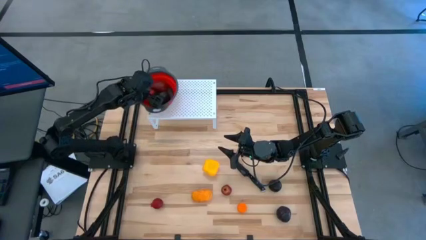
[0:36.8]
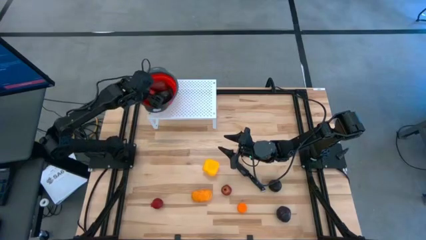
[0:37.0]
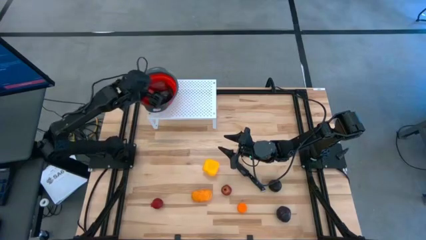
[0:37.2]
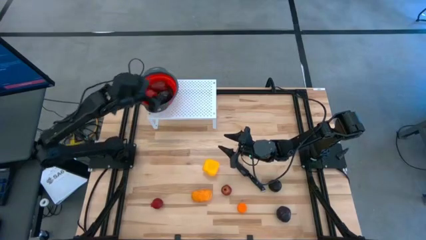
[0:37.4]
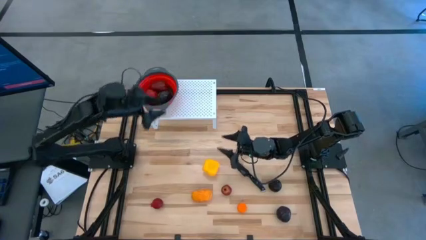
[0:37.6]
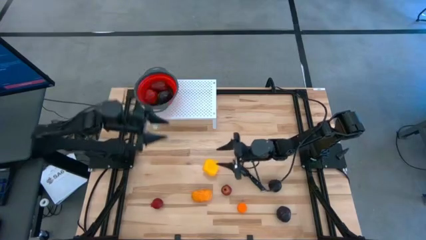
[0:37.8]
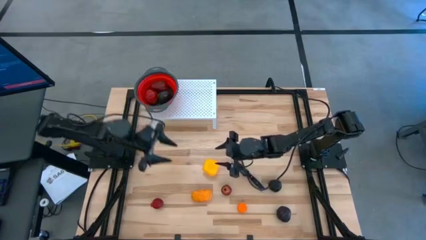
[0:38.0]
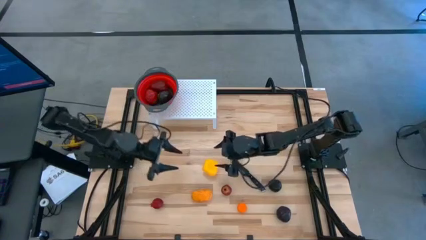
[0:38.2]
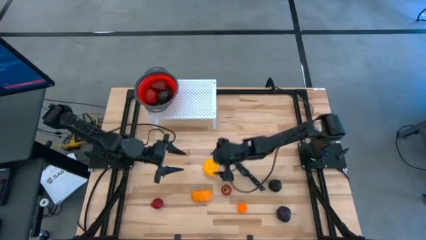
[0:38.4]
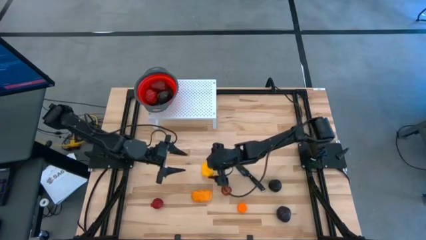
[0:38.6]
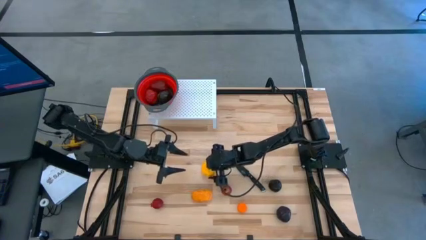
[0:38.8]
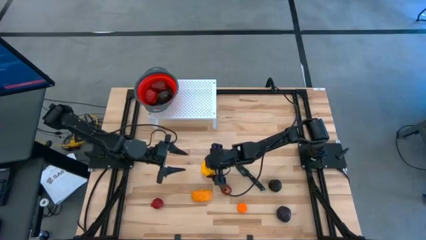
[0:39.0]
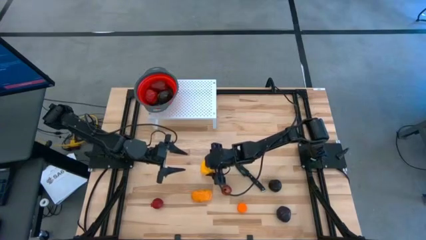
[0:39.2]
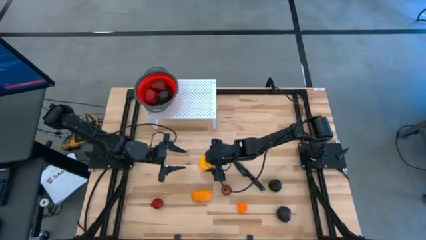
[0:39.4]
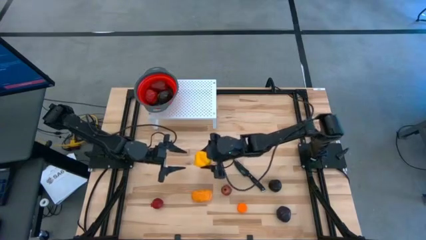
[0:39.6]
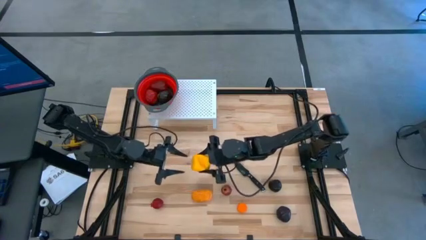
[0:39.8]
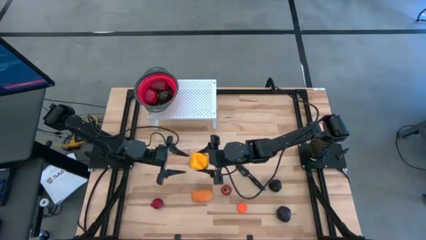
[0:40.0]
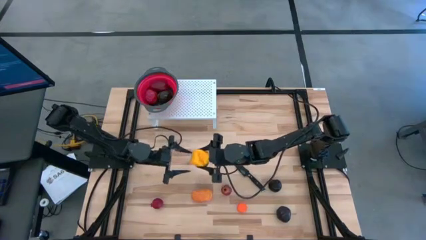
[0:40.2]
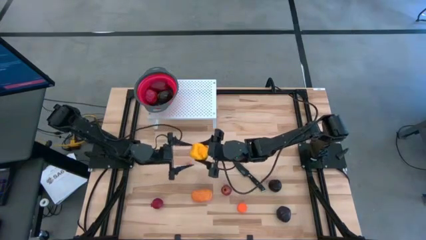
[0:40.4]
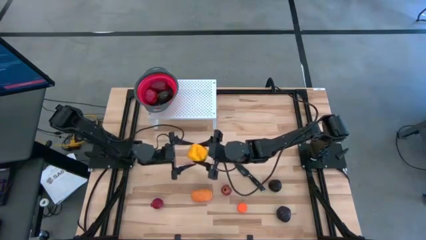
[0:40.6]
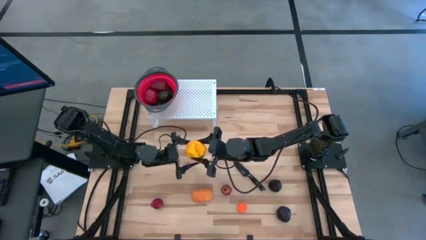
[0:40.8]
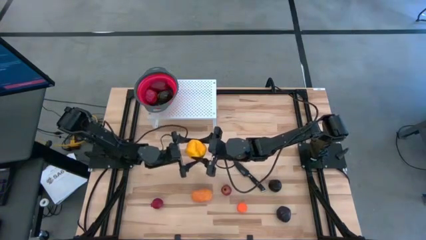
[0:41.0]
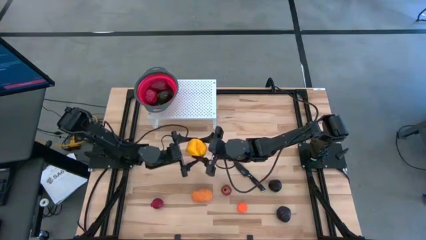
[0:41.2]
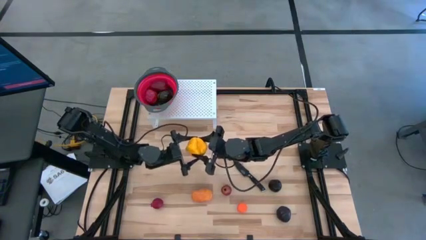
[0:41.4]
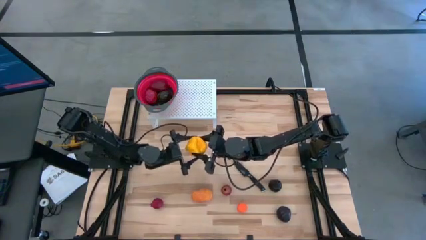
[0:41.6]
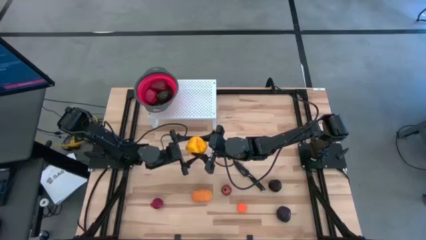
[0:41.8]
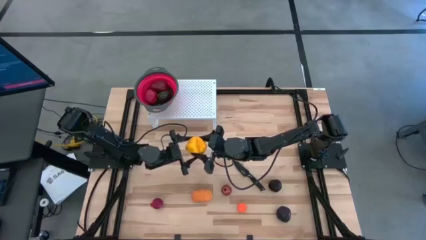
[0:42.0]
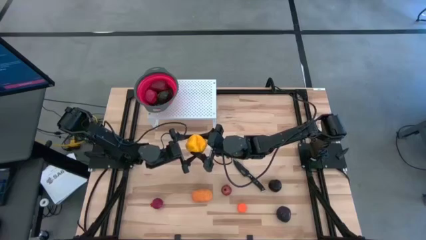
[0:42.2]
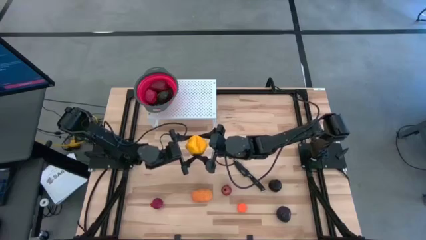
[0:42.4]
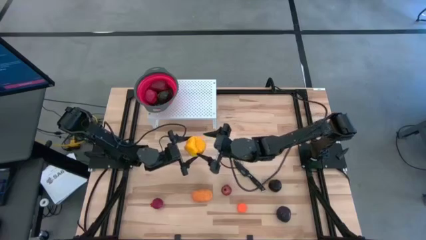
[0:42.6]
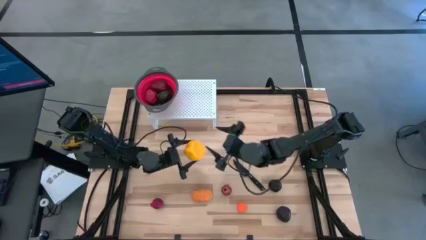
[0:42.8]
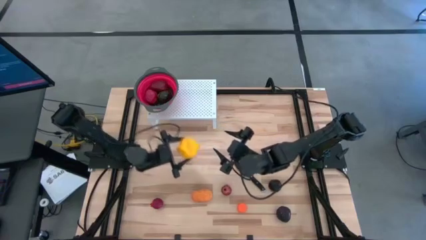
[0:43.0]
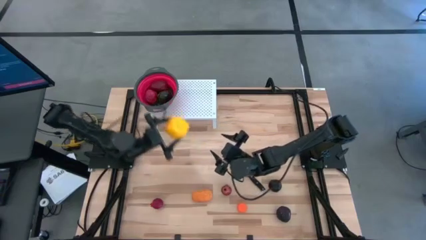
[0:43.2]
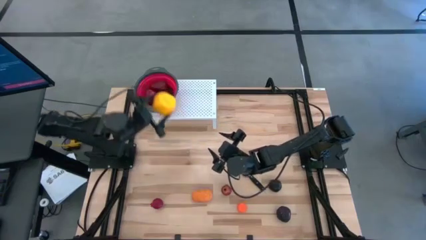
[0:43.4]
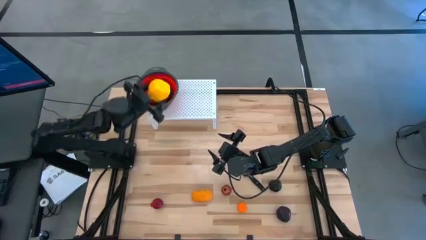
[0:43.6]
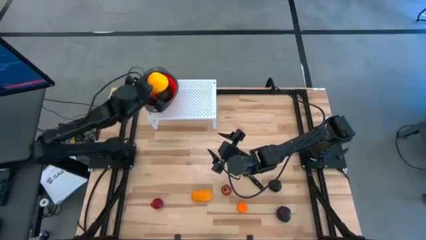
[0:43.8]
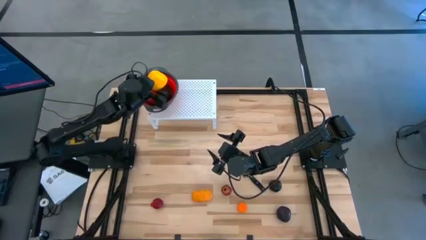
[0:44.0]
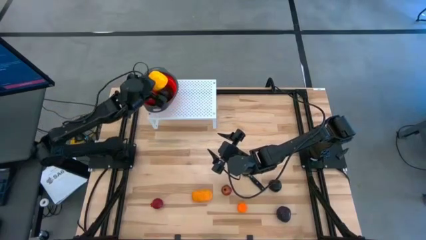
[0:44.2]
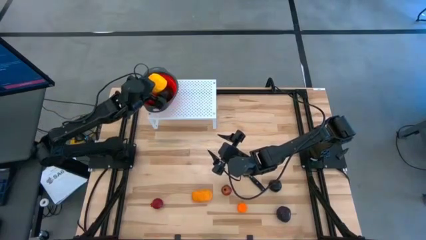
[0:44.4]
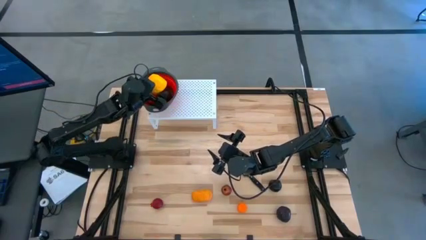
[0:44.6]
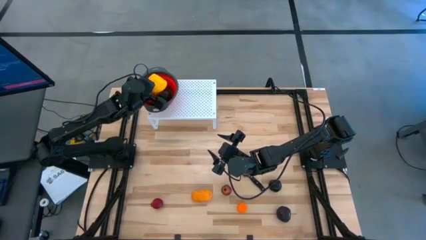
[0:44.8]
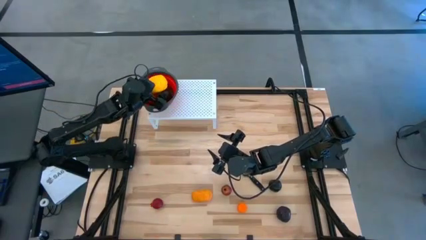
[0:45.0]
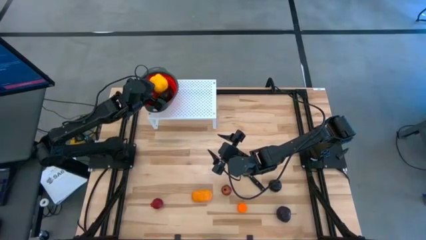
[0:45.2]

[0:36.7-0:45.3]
Task: Pick & Place Fruit
Put the yellow bell pepper into the red strainer bowl on the shelf

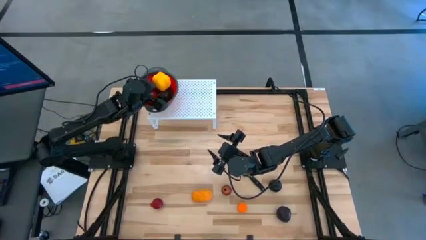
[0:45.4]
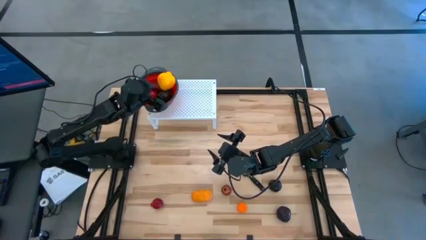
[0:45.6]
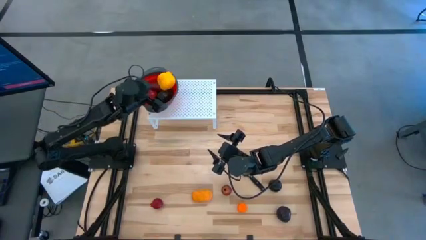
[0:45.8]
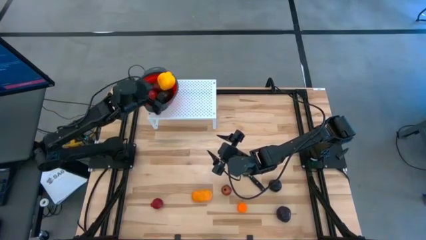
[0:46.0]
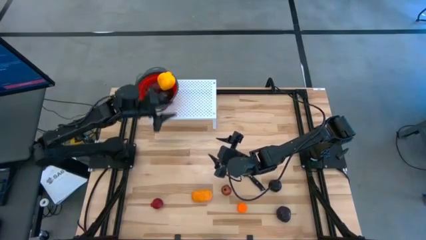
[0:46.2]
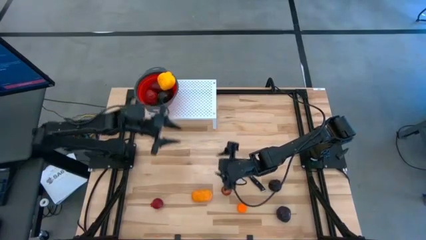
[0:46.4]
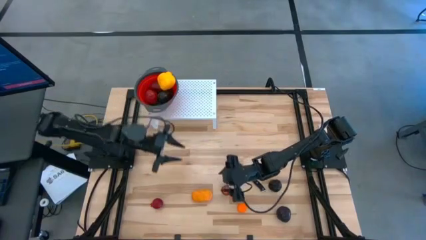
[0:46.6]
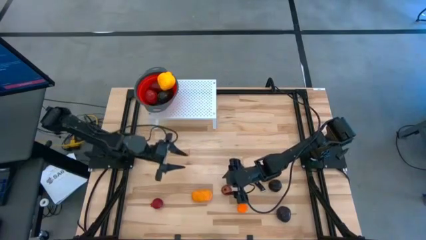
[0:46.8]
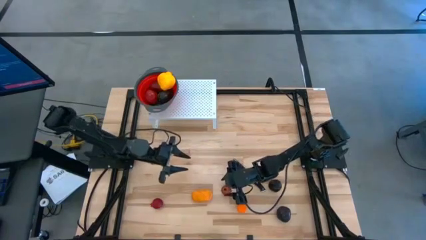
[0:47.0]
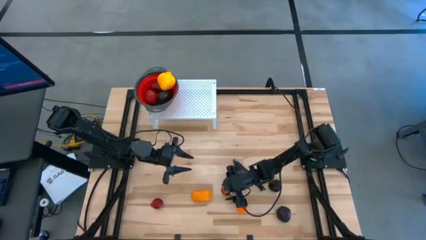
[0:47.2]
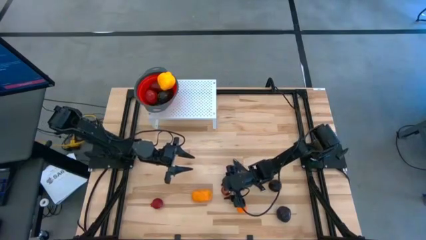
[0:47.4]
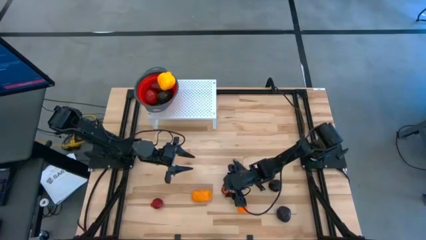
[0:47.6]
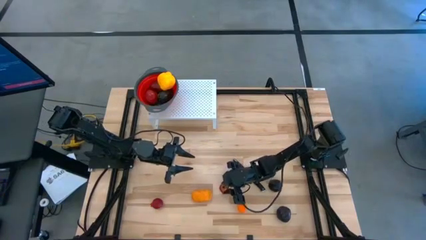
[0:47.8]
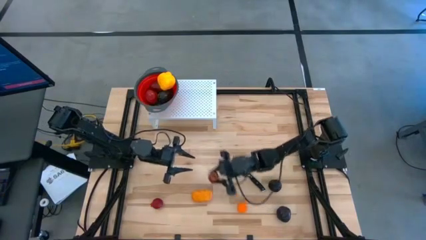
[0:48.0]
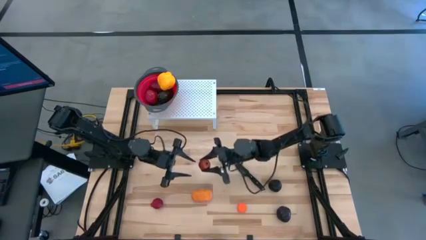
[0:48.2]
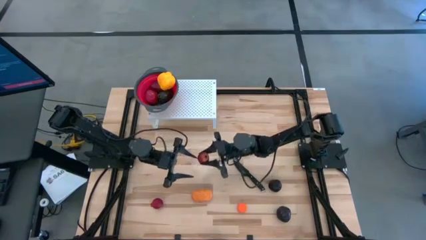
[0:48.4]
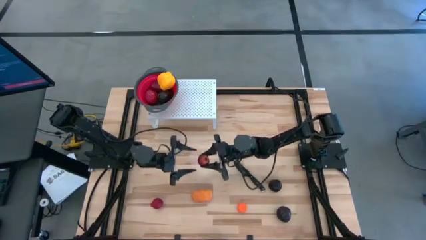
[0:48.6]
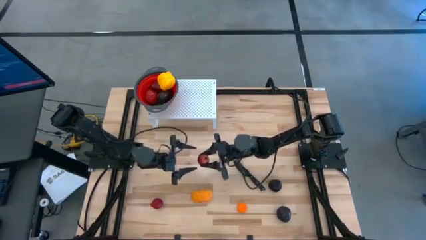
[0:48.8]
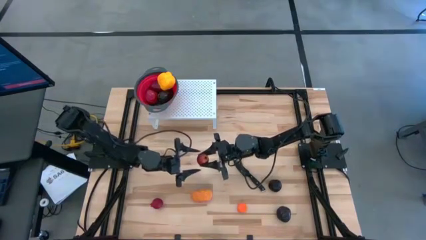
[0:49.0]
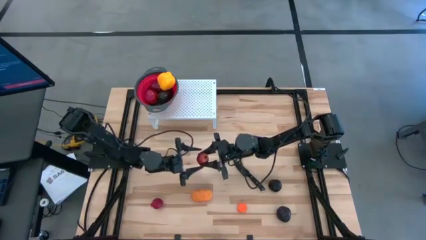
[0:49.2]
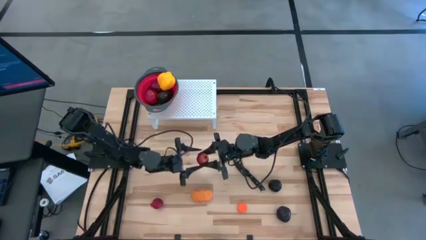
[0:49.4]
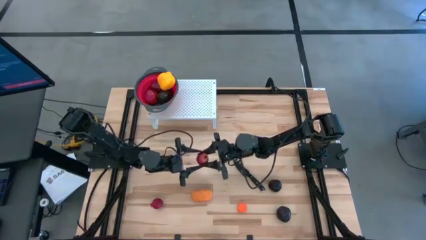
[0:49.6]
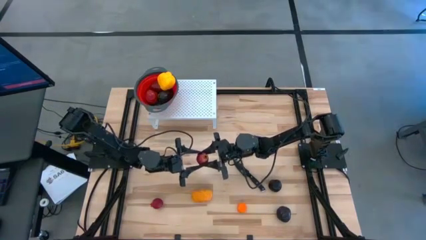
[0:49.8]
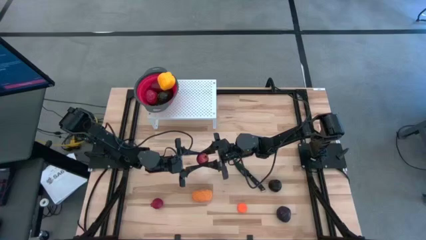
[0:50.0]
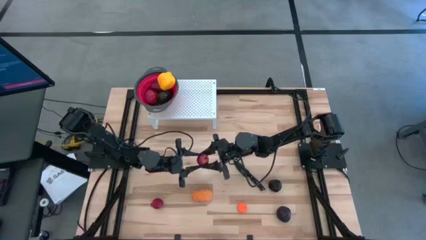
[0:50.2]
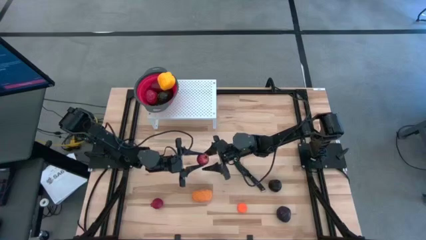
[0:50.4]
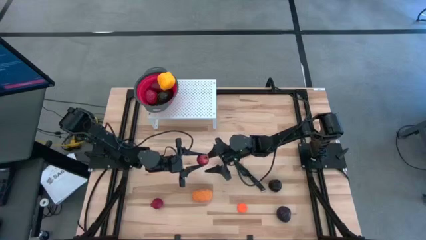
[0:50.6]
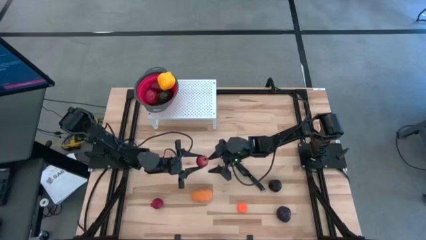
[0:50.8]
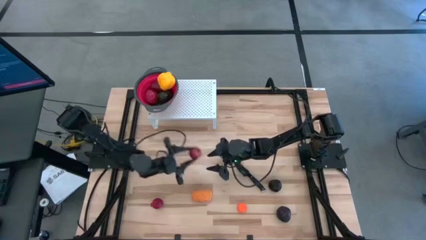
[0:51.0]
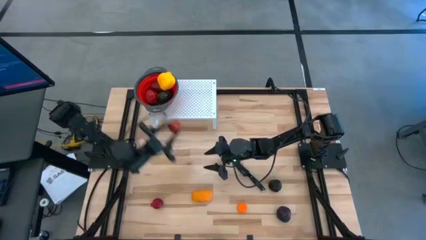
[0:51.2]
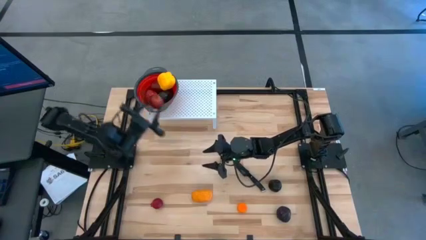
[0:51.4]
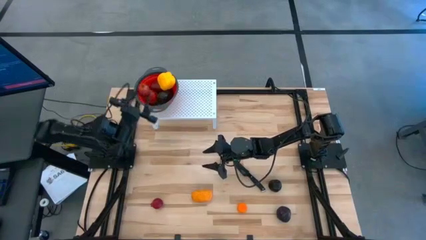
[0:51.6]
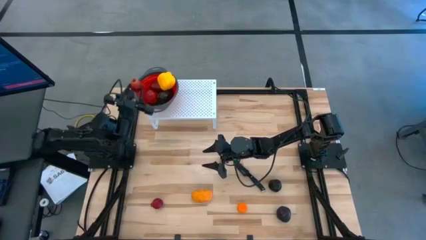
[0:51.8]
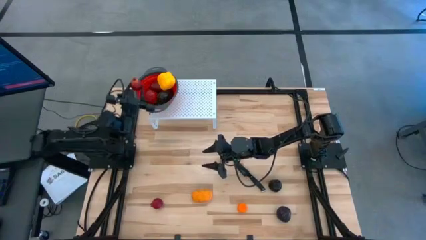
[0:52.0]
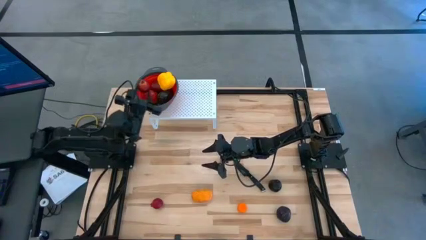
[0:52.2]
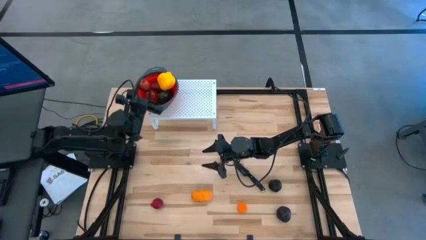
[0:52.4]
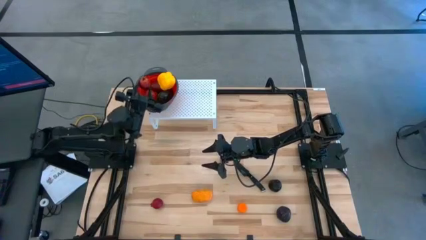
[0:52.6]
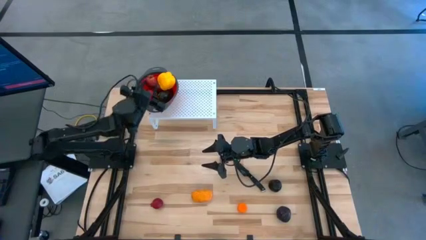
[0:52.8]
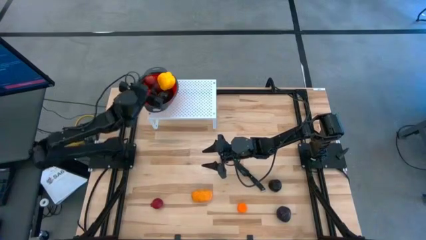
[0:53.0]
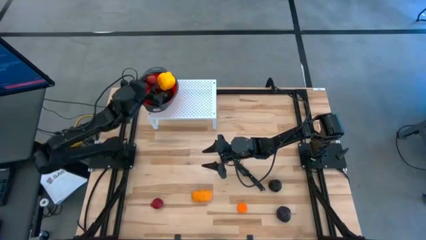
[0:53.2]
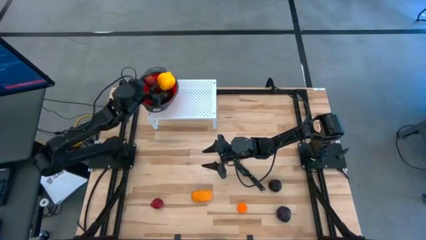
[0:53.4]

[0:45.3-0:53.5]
Put the right red pomegranate into the red strainer bowl on the shelf
